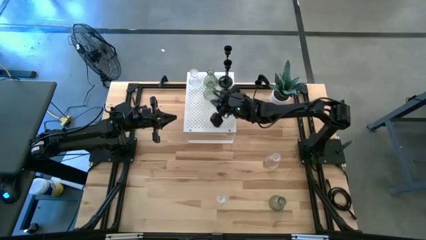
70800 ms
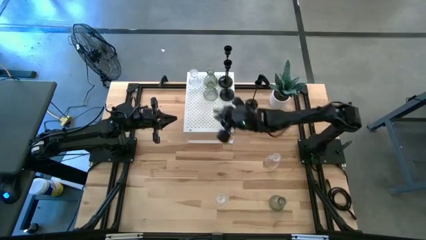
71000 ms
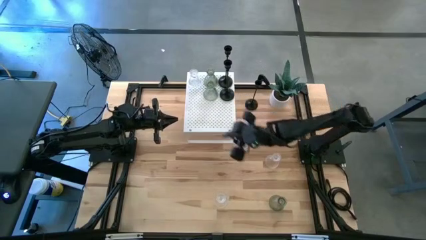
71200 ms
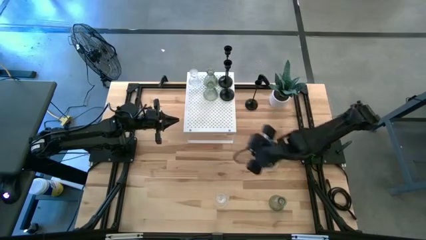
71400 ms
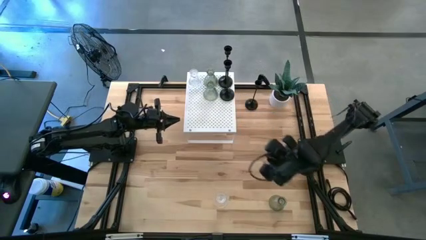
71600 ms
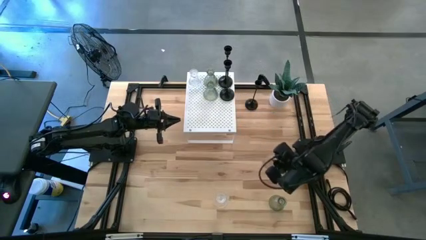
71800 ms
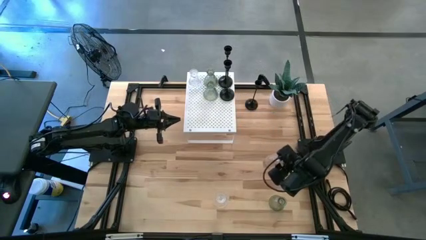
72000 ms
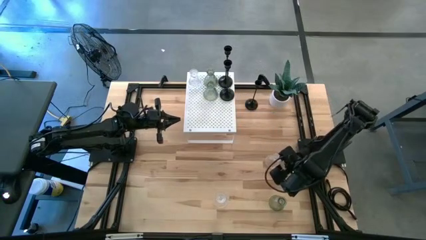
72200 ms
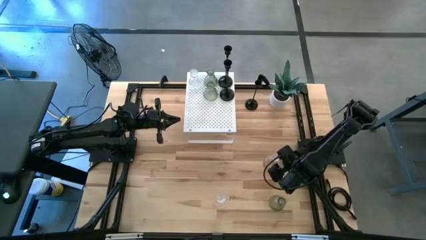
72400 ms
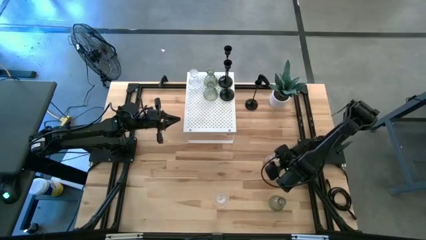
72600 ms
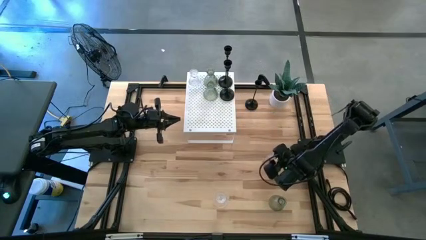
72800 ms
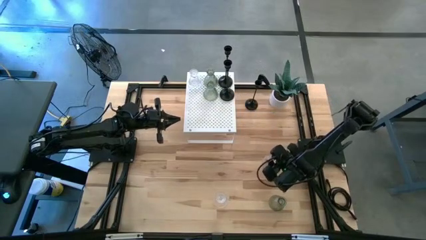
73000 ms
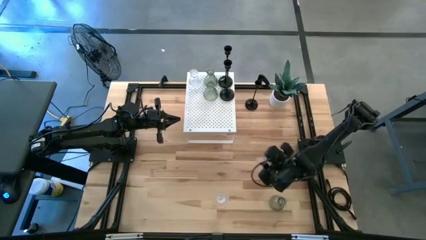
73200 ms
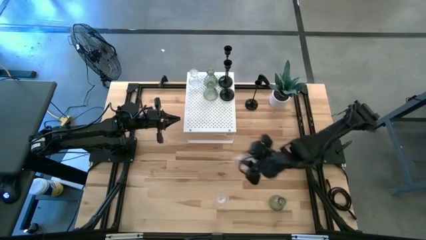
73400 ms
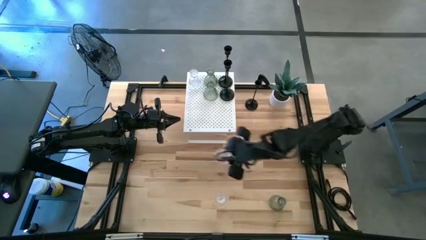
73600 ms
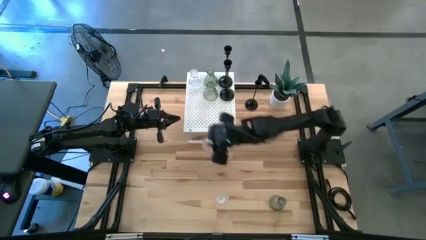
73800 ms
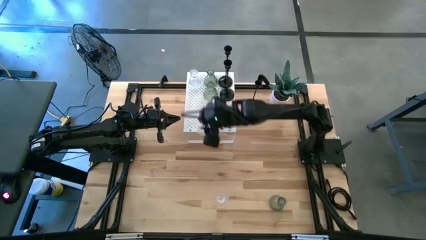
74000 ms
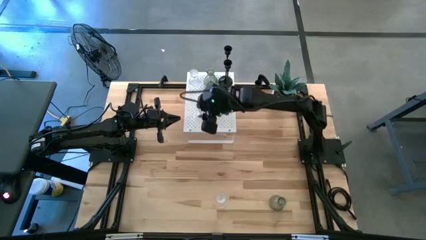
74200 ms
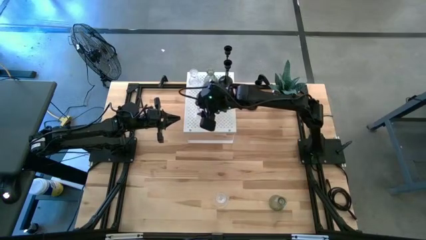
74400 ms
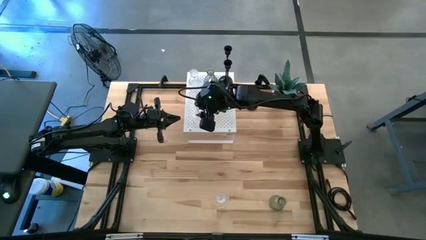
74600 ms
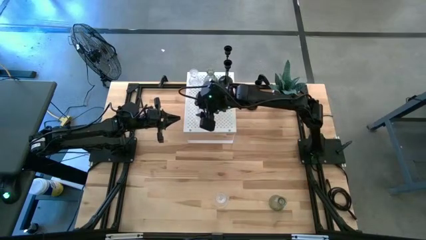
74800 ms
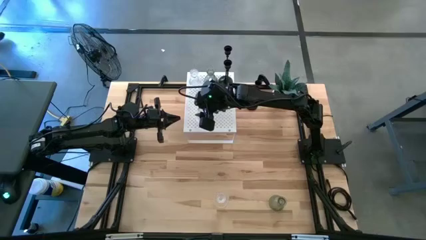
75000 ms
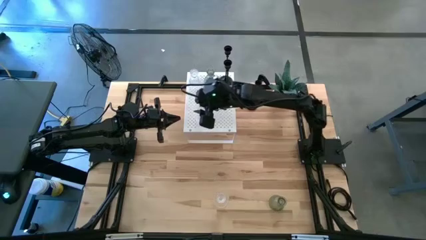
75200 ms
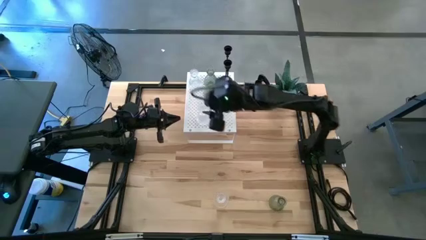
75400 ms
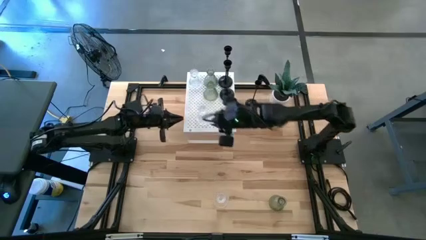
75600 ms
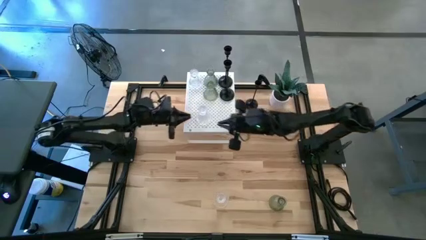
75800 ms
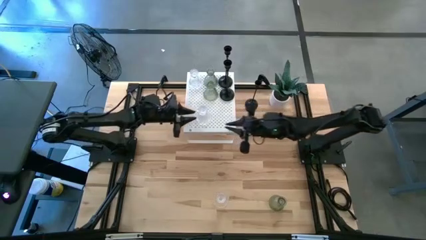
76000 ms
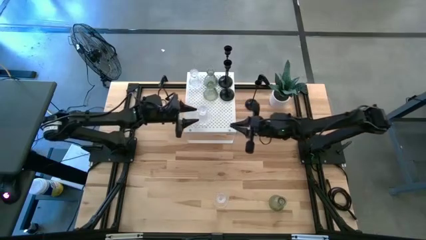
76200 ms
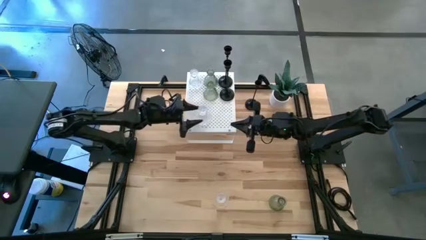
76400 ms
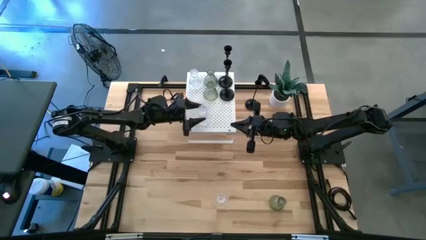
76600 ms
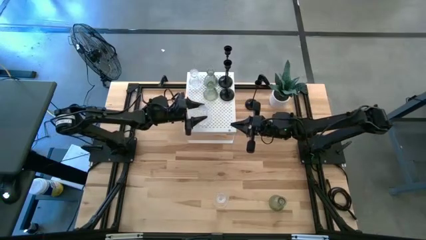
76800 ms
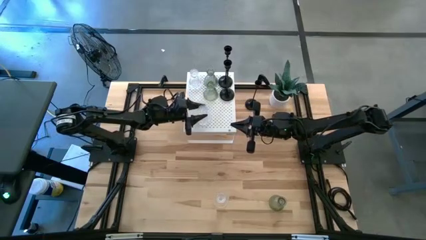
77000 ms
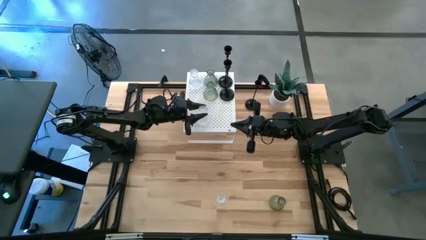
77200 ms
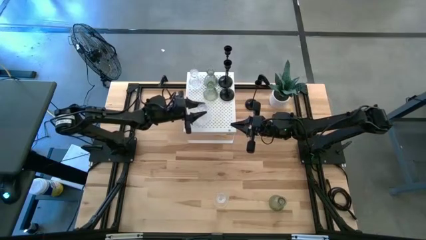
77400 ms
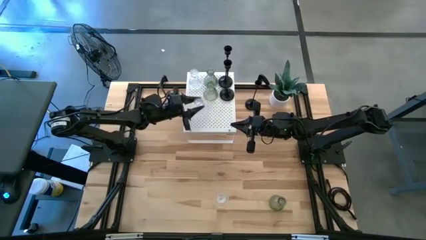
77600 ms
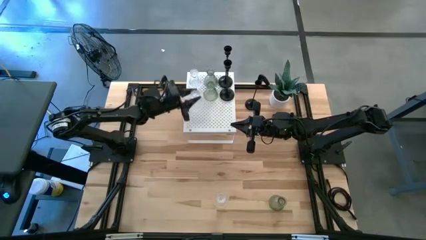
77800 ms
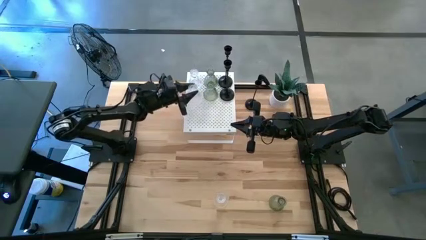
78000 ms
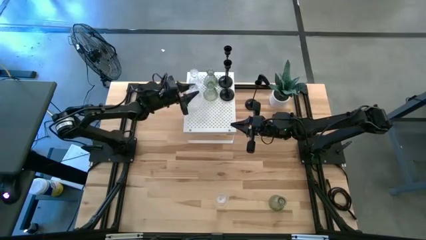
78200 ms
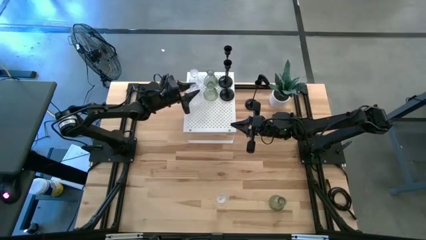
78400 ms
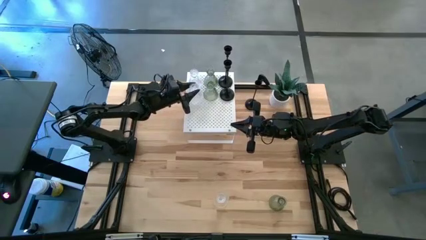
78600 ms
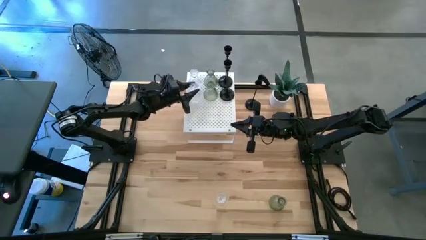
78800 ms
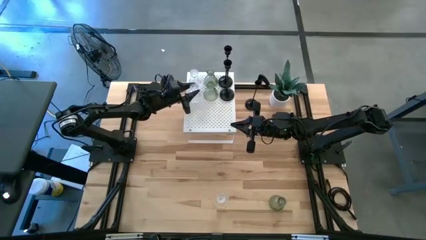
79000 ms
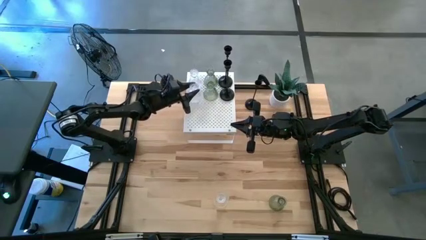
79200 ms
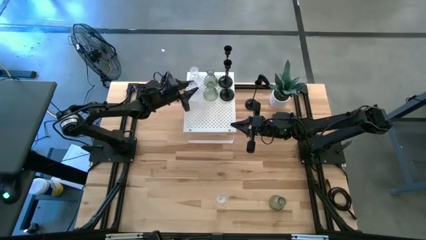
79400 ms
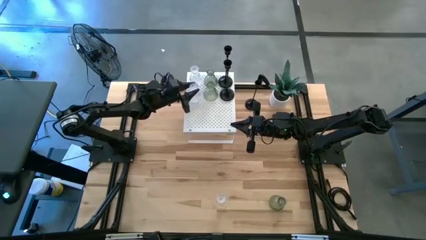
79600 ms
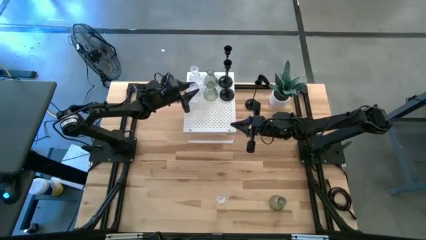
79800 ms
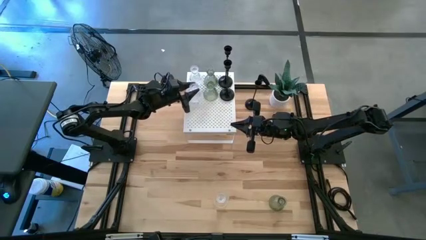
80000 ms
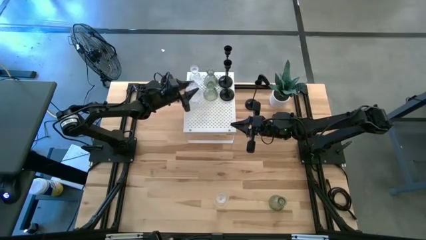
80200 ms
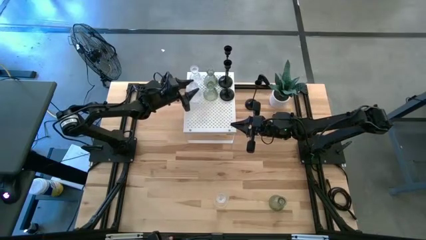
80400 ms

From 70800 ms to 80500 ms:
Task: Pick & Place candle stick holders
Put the top transparent glass candle holder on the shelf aligned with the other transparent glass candle holder

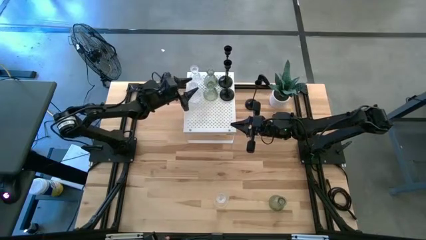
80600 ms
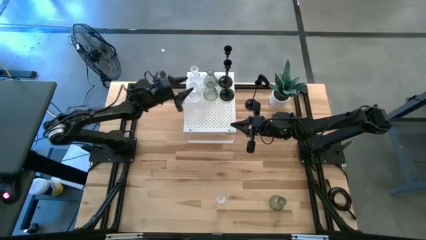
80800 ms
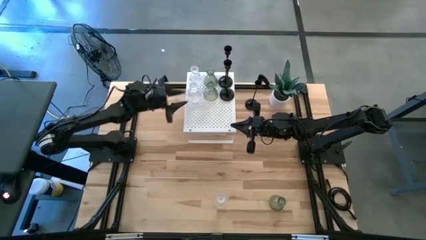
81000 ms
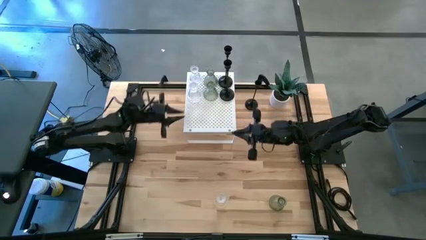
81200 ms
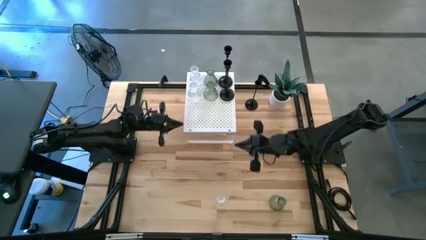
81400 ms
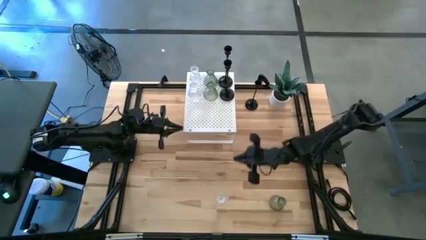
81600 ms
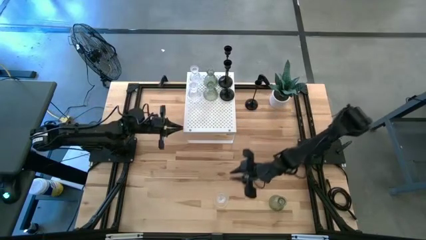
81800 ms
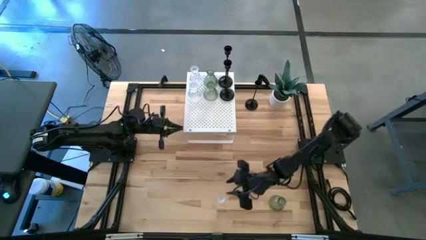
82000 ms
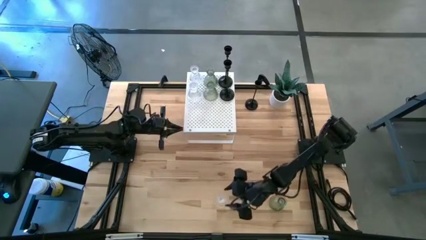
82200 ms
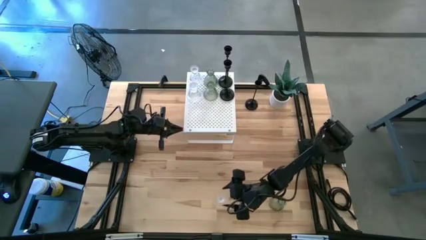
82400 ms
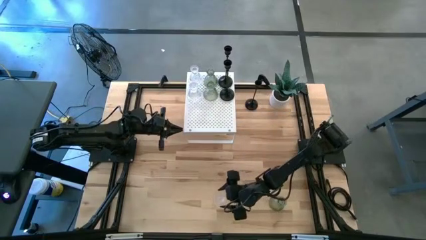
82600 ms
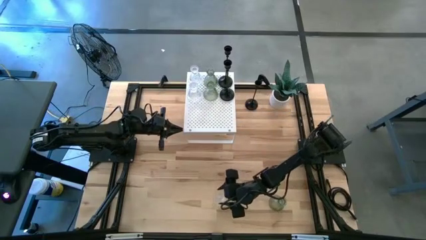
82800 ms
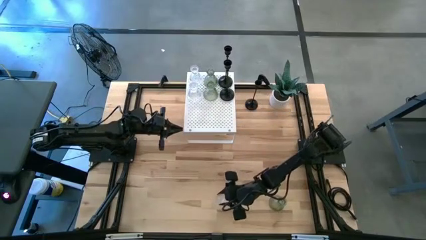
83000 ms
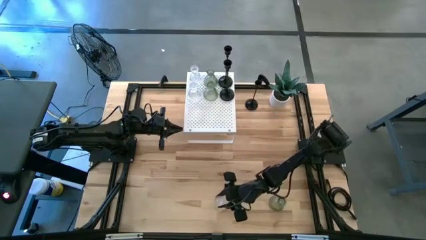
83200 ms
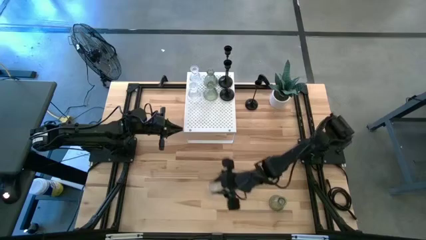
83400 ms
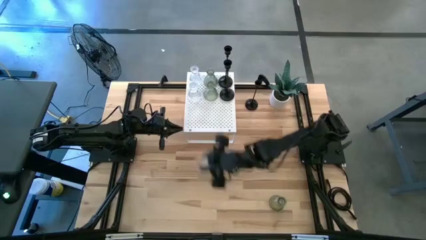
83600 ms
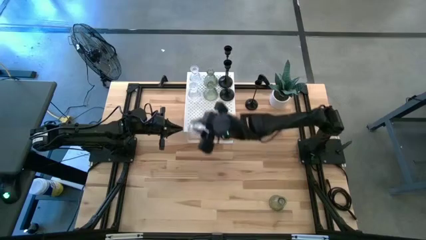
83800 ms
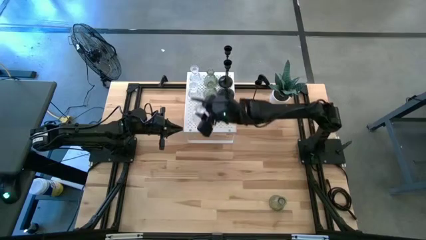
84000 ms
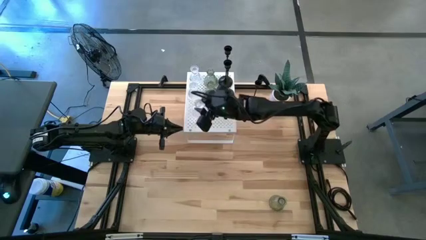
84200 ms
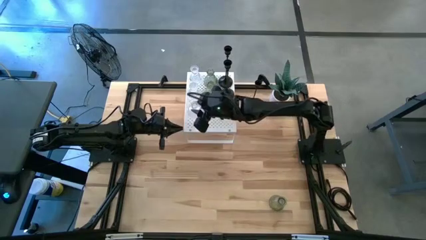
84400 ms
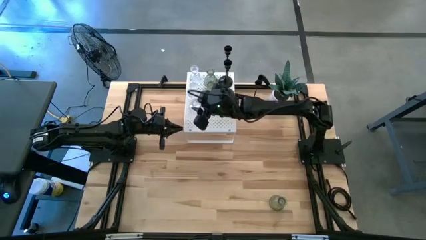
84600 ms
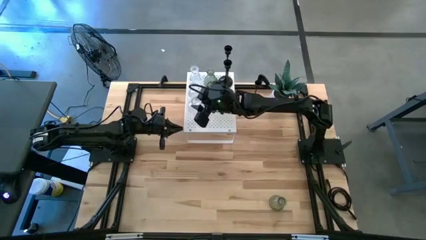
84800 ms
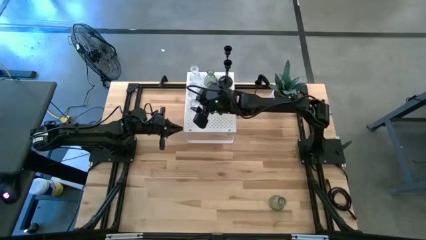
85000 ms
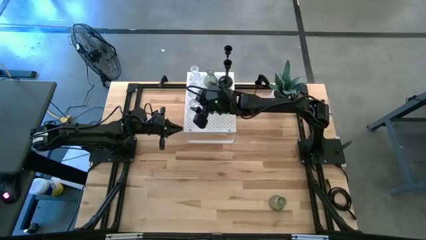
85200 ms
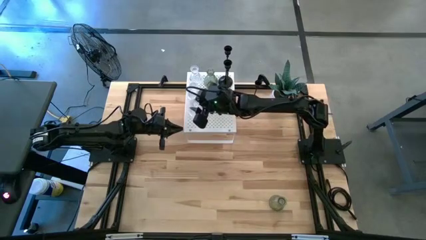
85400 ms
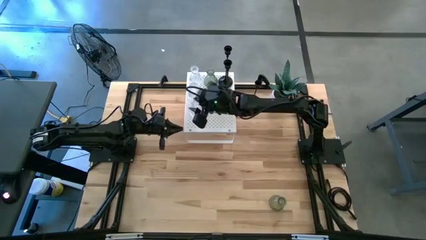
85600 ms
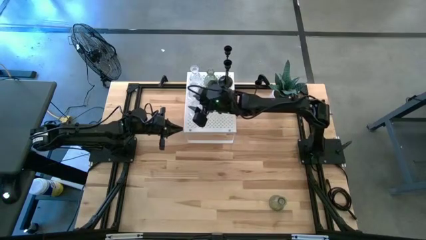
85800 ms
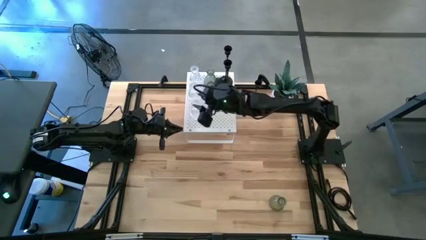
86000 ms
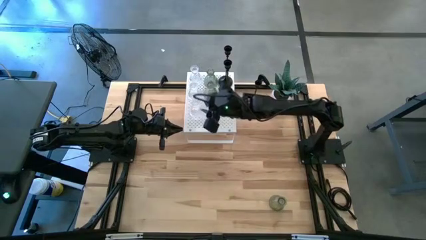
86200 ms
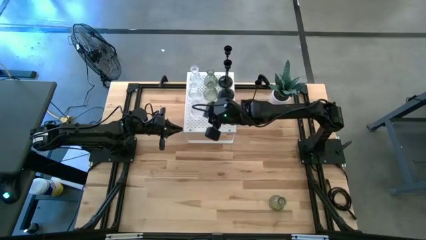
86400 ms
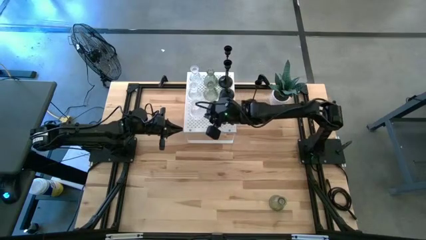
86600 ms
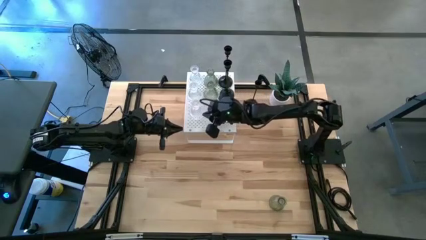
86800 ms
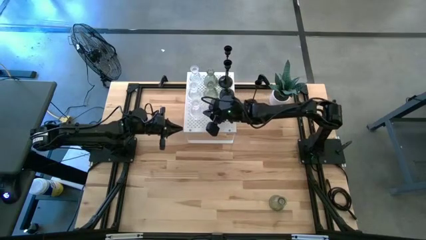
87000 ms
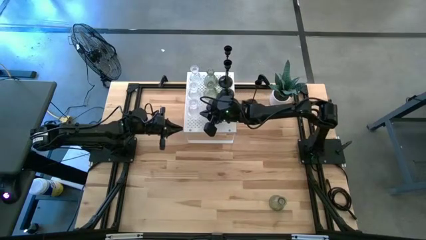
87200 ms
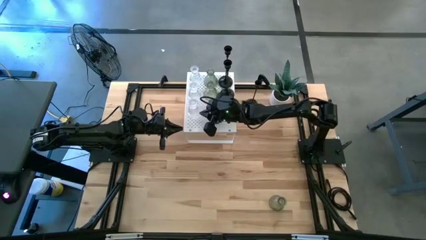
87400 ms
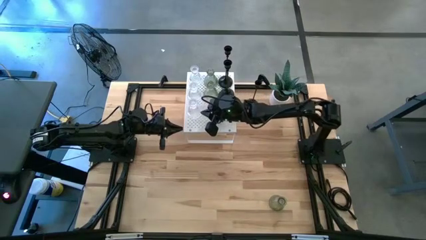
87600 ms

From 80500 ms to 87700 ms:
Put the transparent glass candle holder on the shelf aligned with the other transparent glass candle holders
